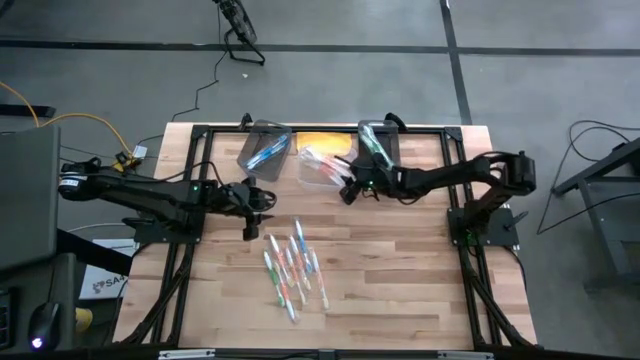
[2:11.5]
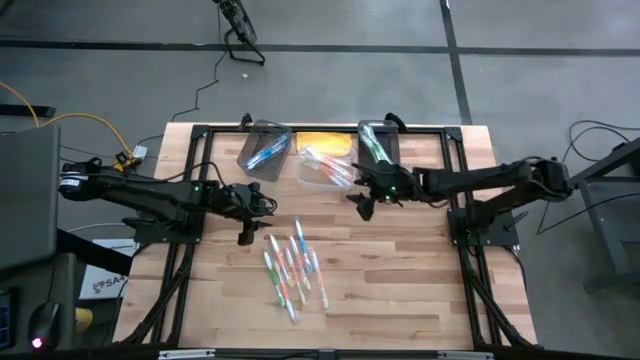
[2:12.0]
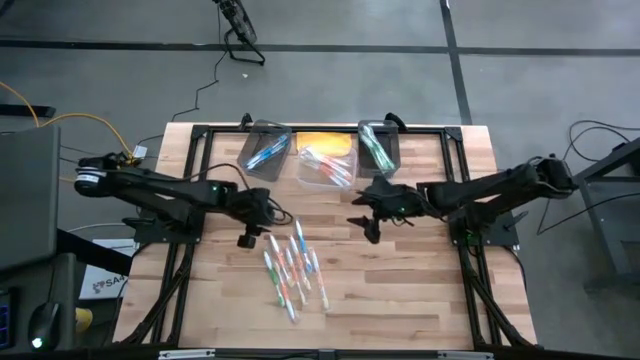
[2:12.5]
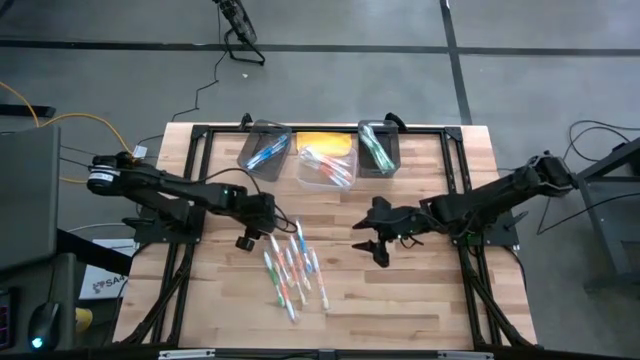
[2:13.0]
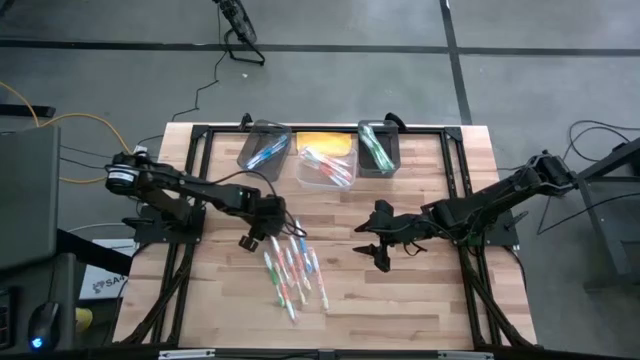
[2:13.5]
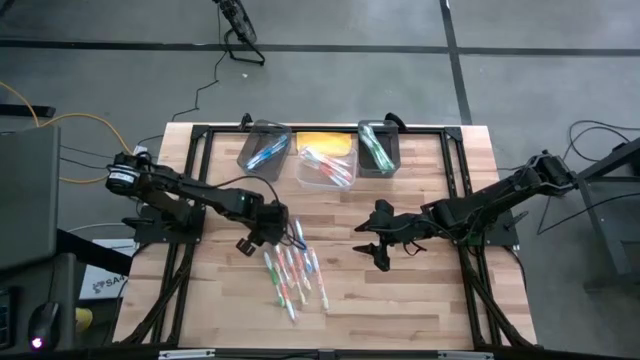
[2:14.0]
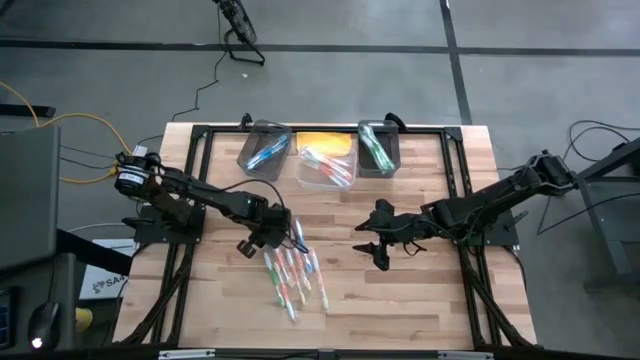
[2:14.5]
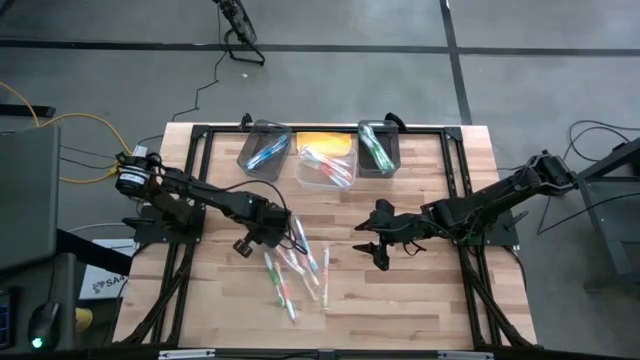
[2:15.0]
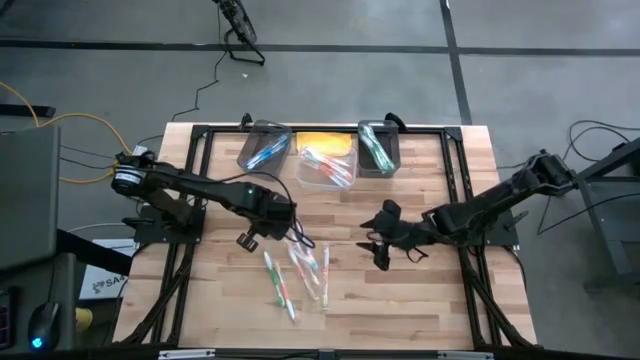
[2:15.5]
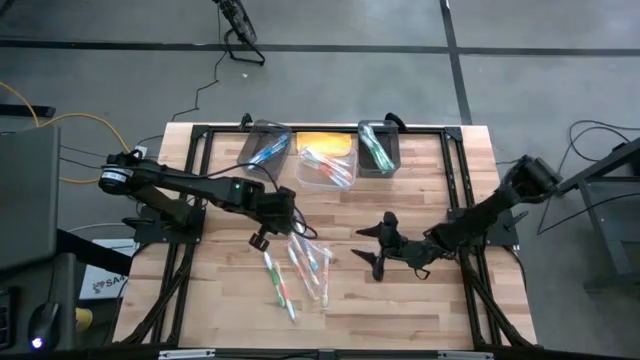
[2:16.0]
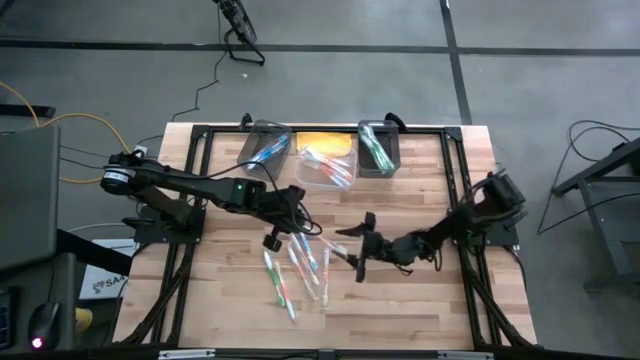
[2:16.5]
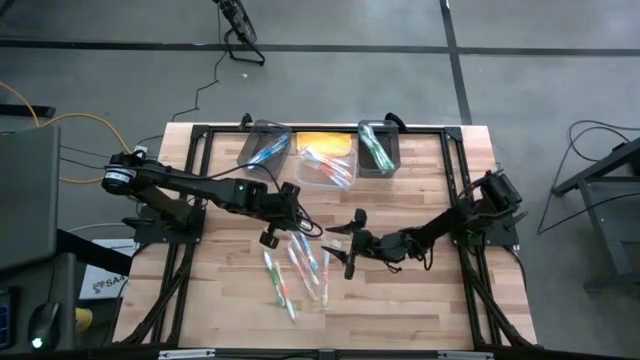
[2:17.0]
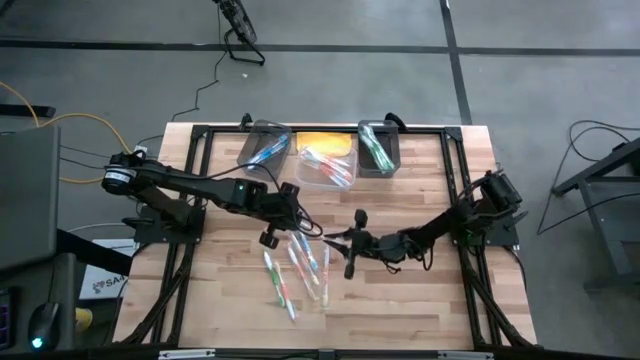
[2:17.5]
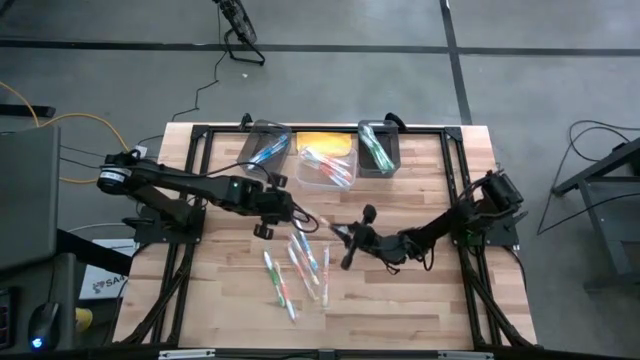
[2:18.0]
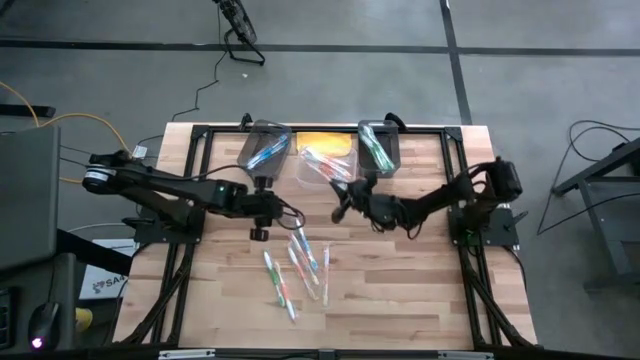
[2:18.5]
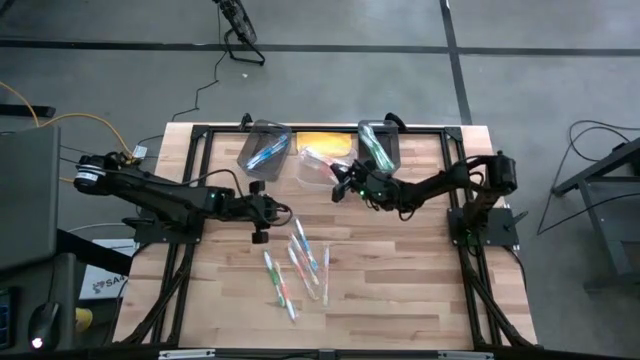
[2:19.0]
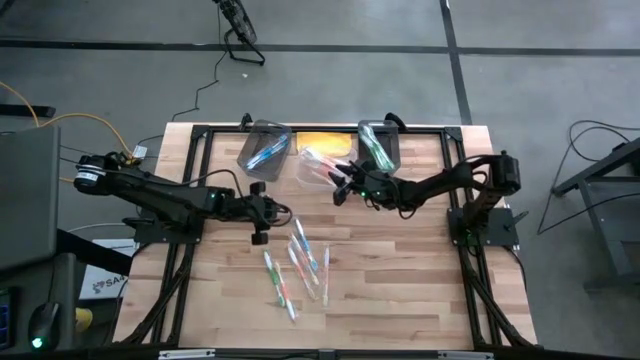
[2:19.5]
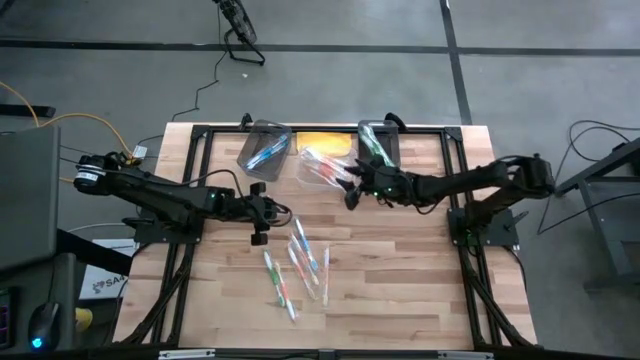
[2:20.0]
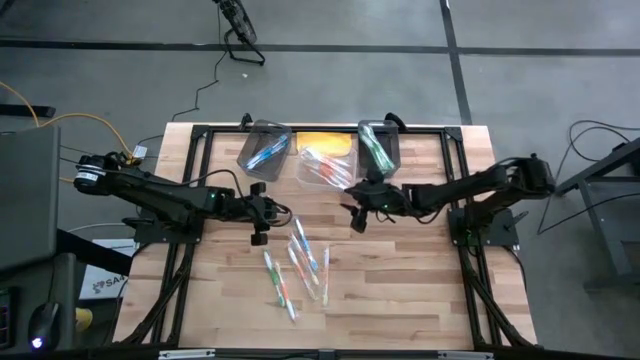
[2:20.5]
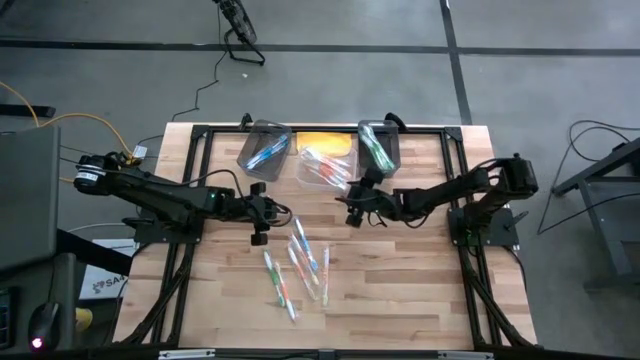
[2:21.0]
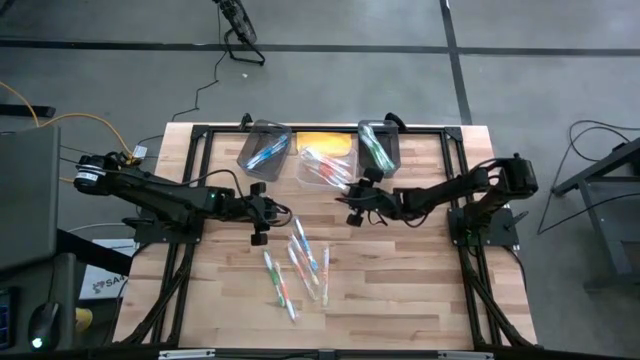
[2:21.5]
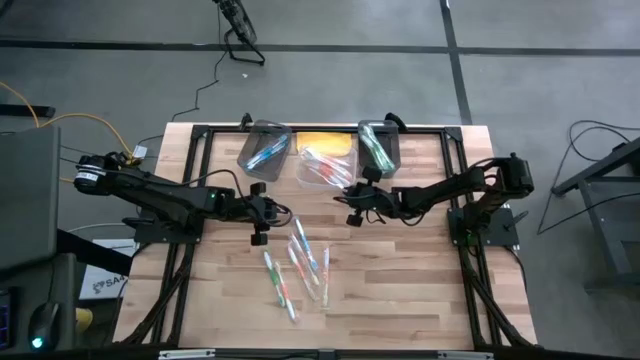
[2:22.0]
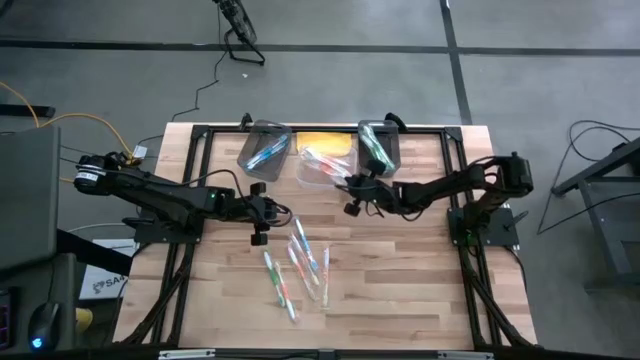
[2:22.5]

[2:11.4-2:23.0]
Task: Pick & Place Toothbrushes
Put the orange toothbrush into the transparent bin

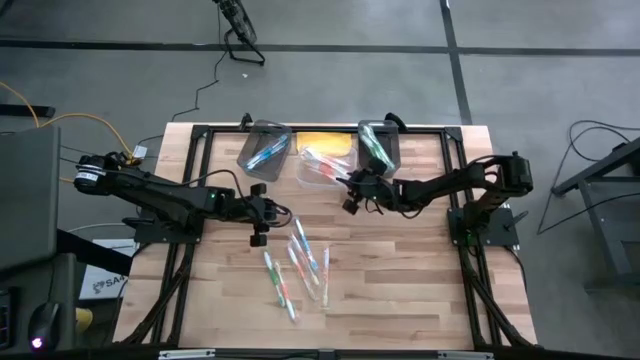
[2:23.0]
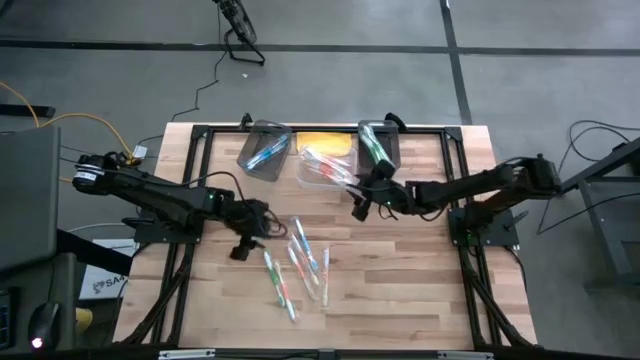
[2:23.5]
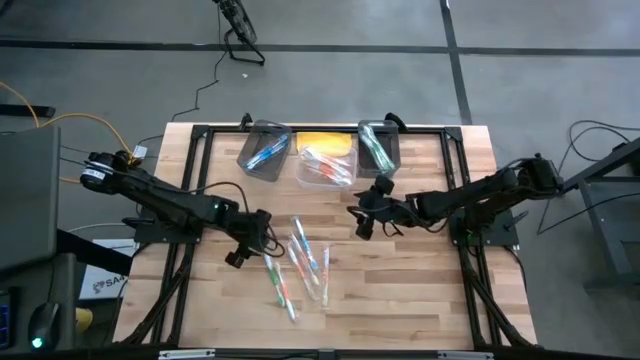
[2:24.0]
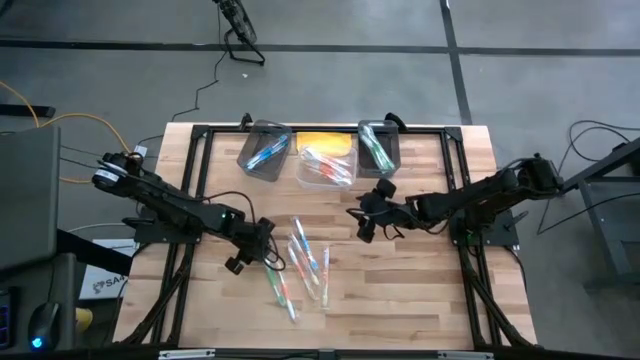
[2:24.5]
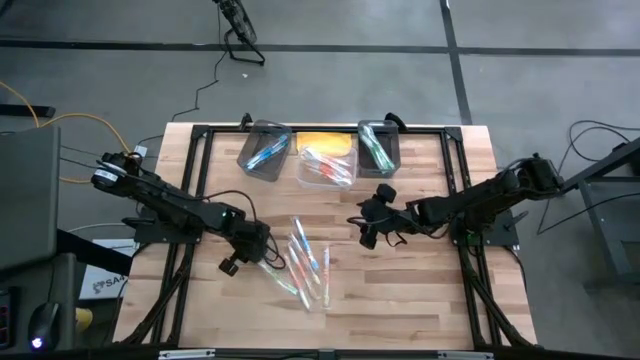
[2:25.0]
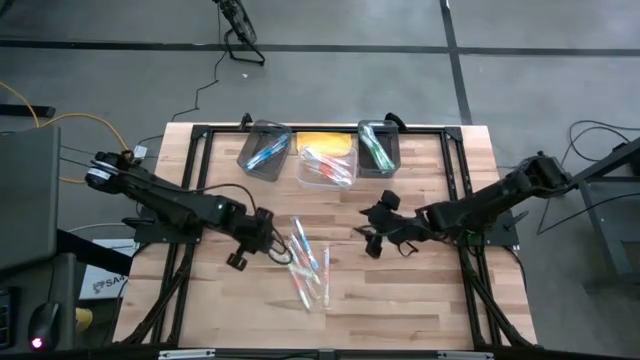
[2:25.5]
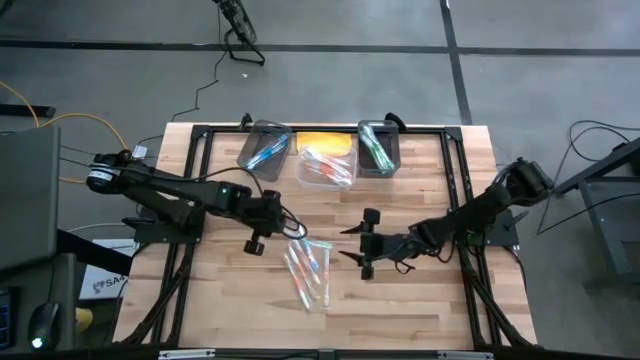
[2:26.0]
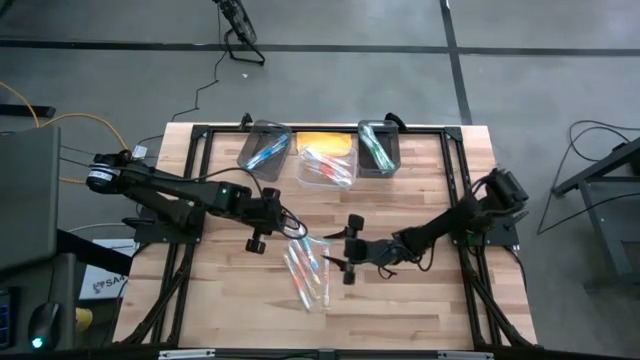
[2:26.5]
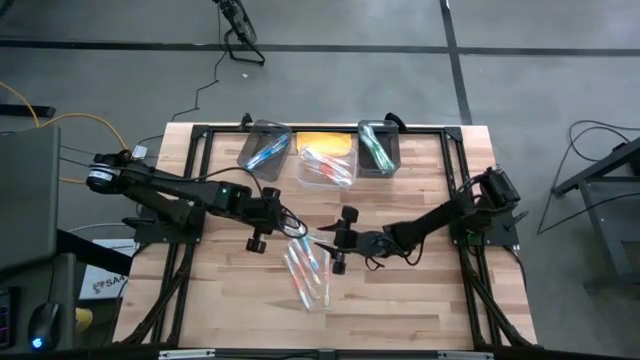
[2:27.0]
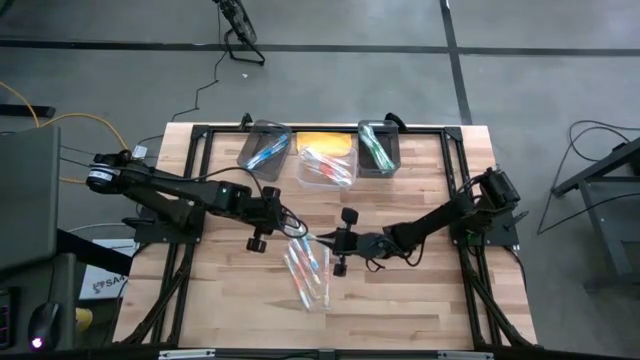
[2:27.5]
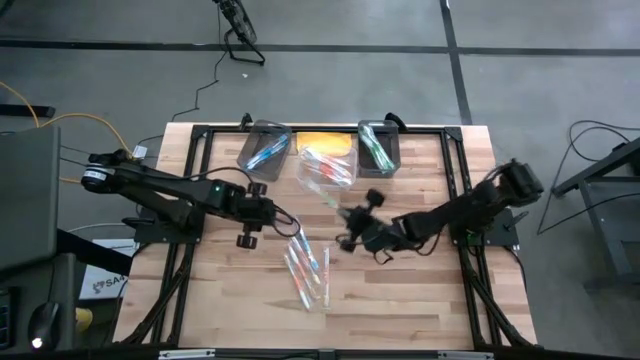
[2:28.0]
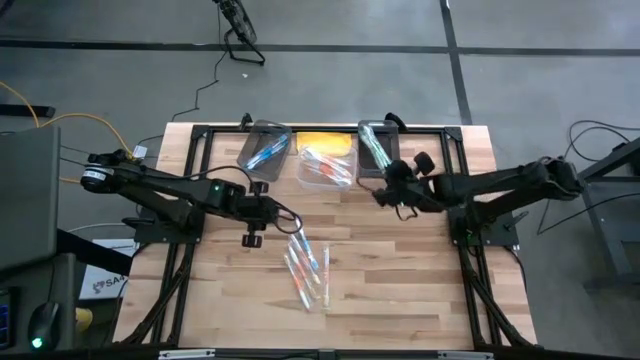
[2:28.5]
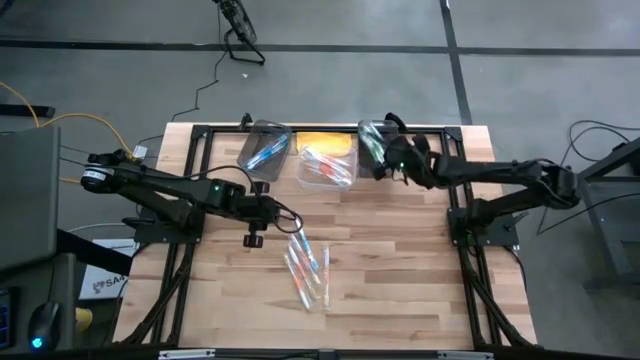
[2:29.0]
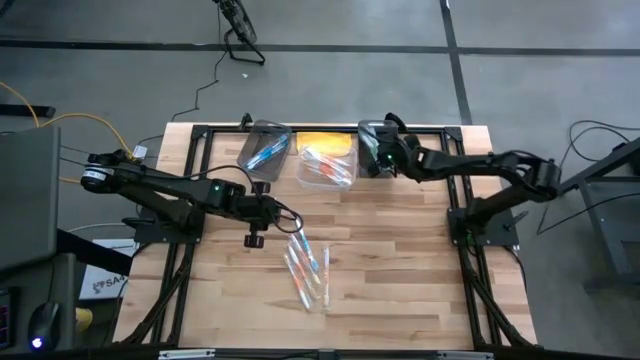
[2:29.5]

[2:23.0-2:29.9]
Put the green toothbrush into the right black bin

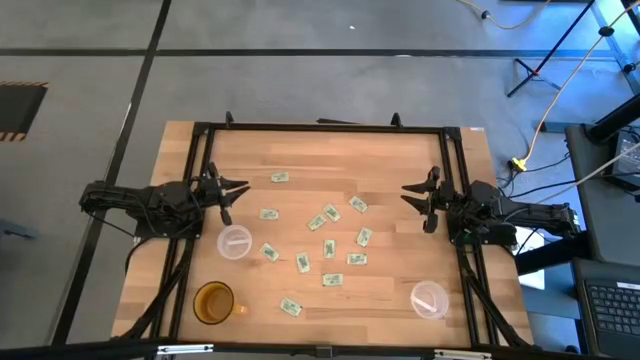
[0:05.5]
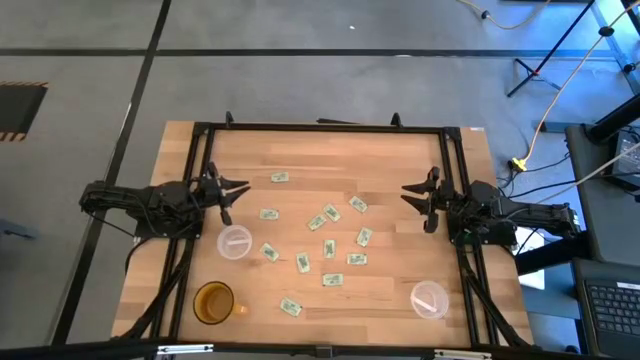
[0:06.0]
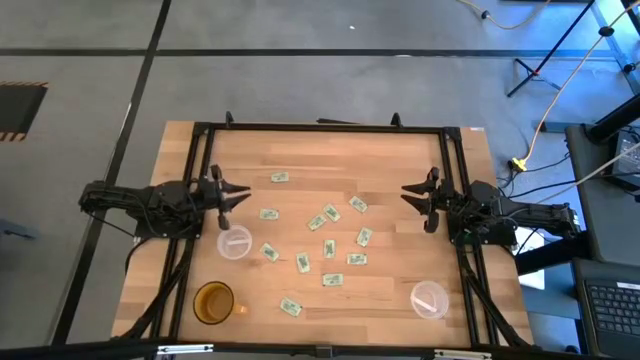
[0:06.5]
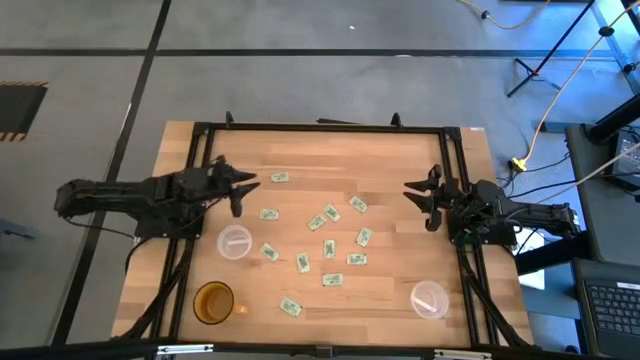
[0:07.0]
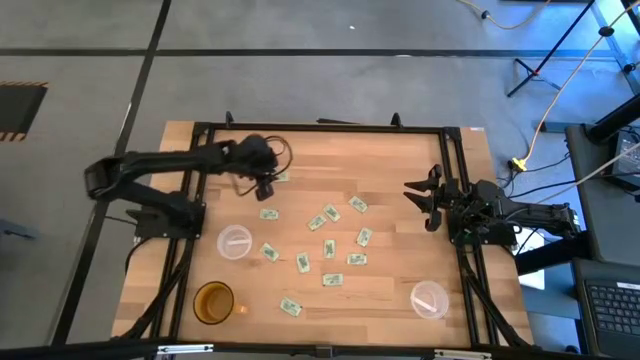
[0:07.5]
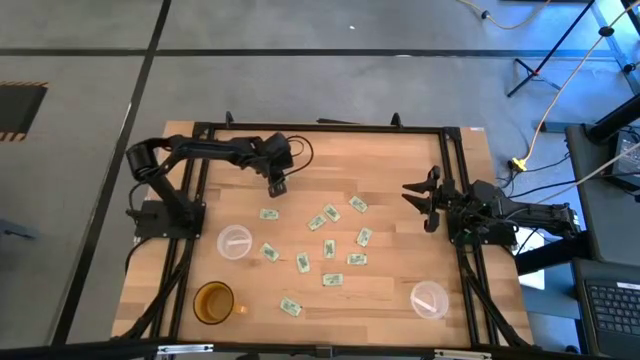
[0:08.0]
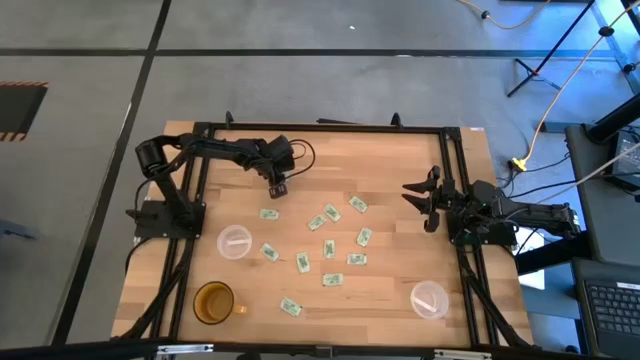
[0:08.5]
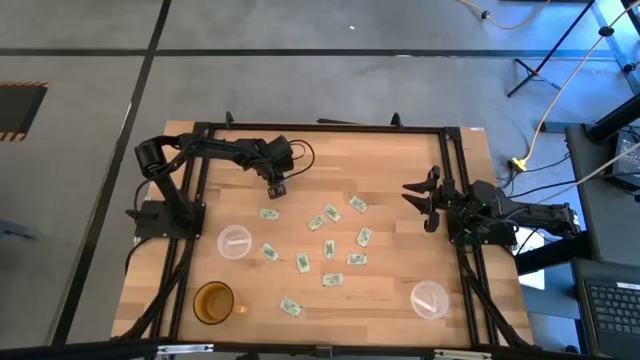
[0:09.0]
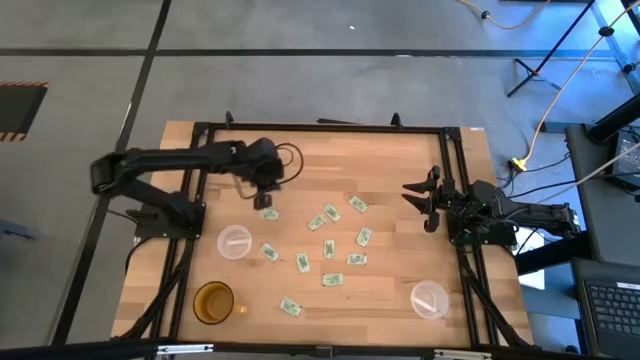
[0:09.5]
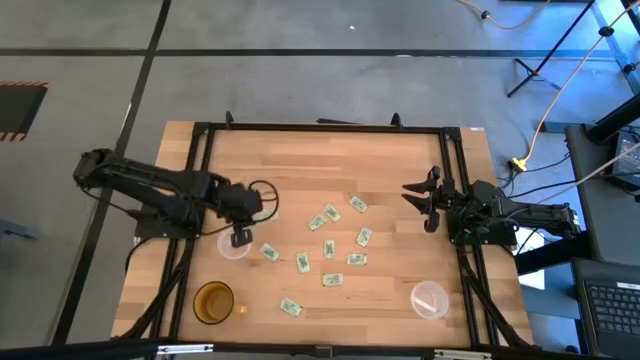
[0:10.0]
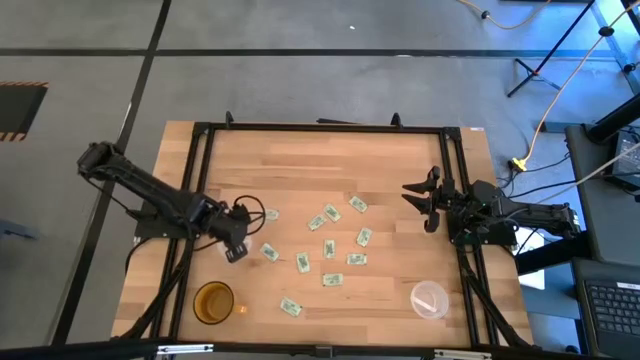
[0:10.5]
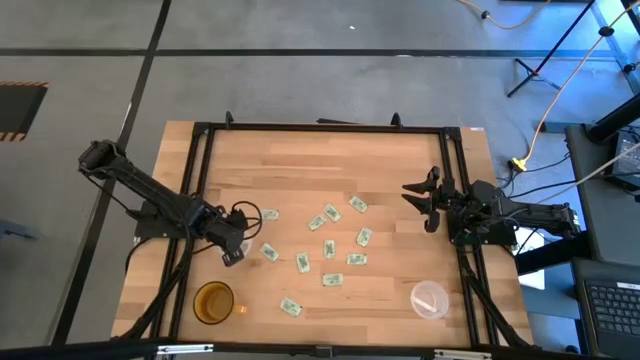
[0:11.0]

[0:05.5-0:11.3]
Task: Pick and place items into bin
Put the green stevia packet into the left transparent bin
